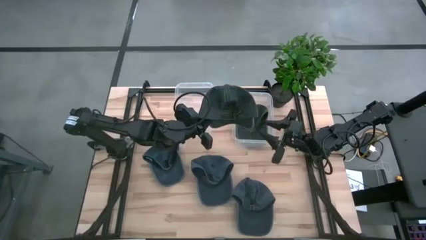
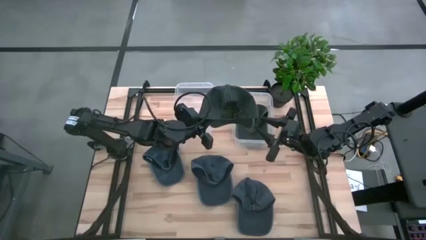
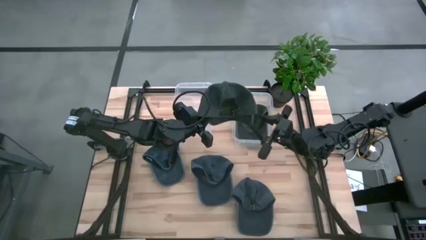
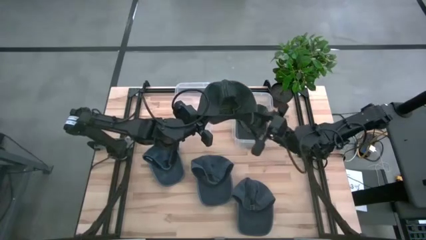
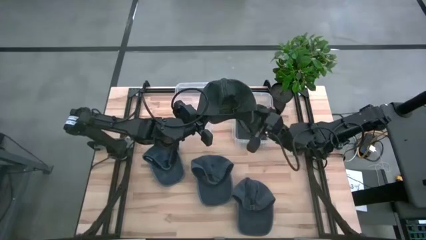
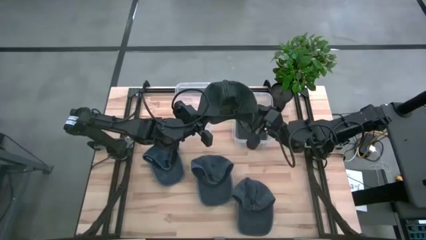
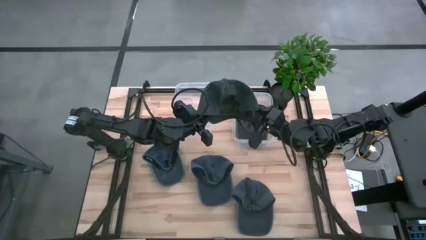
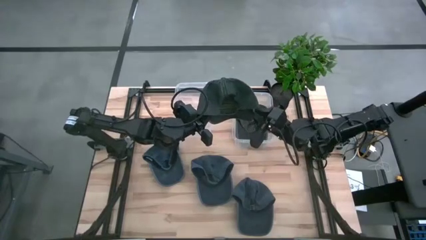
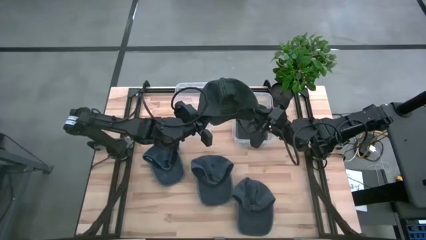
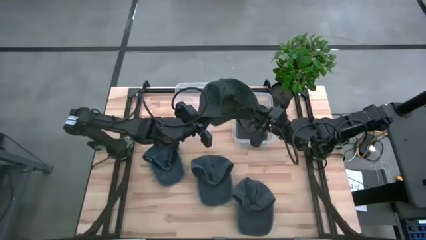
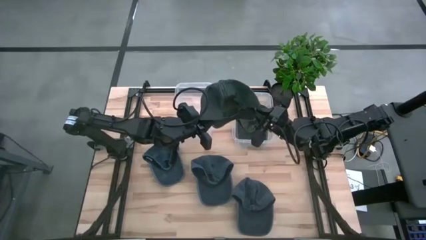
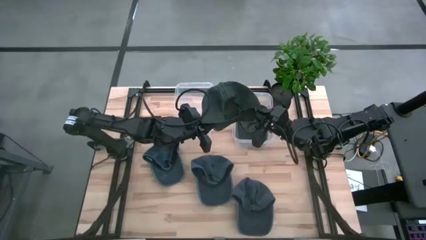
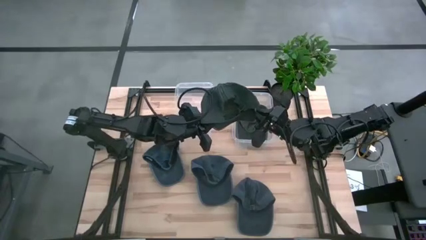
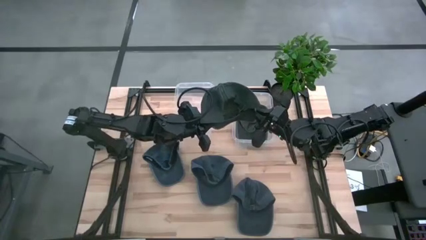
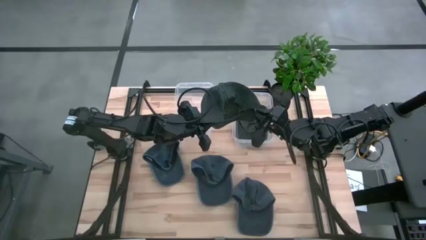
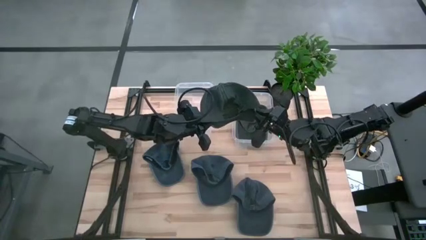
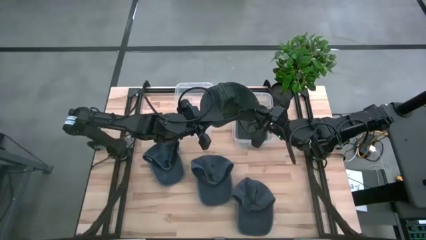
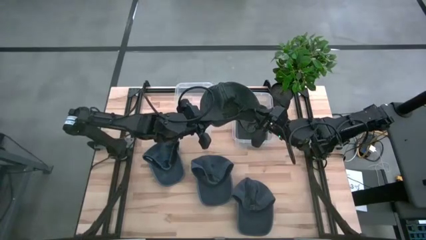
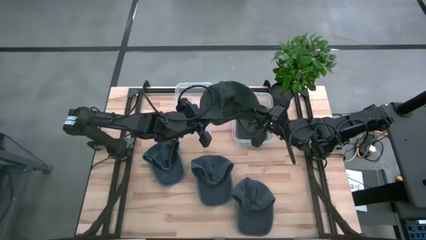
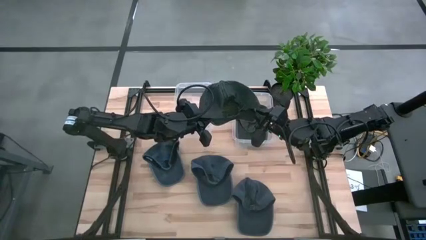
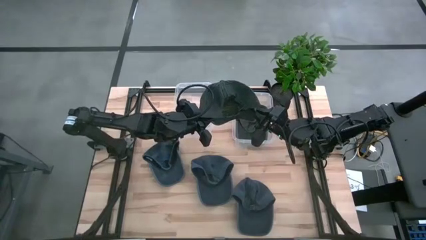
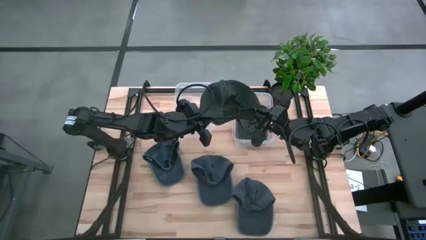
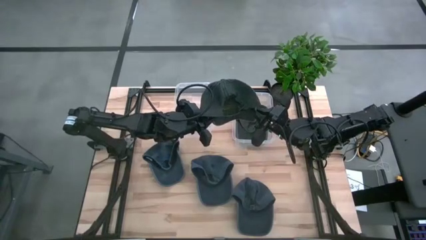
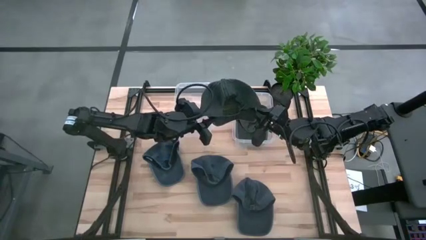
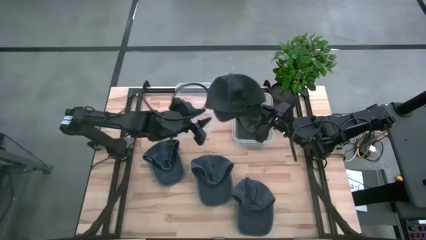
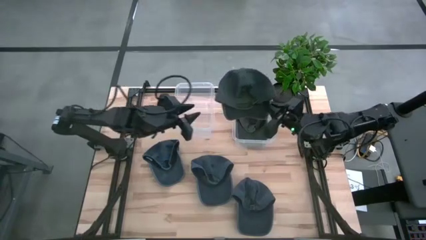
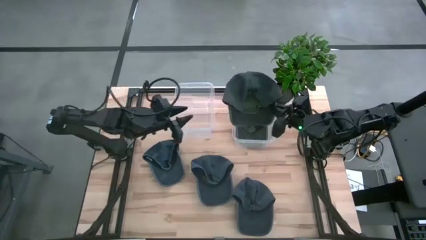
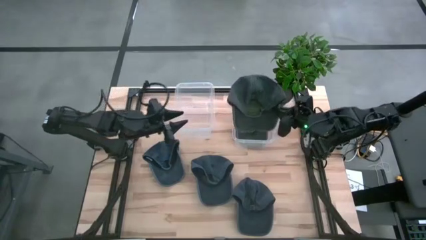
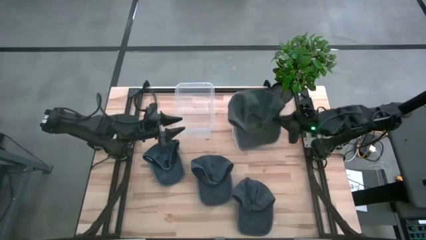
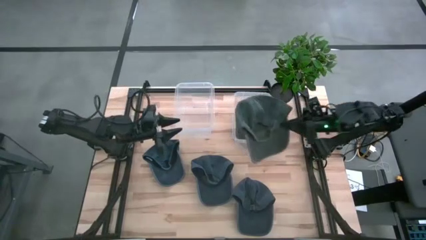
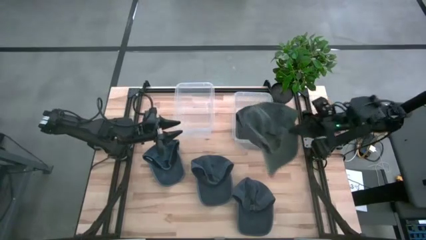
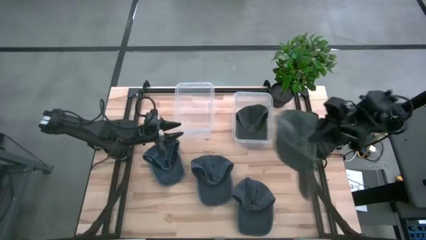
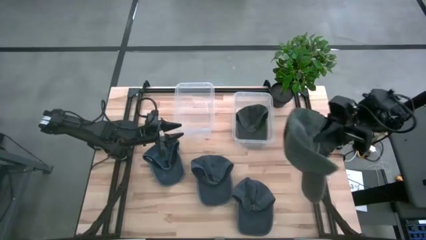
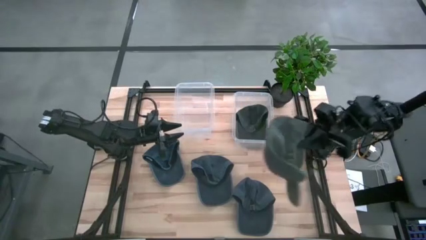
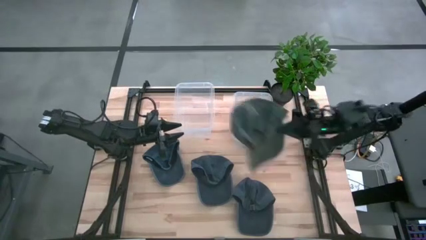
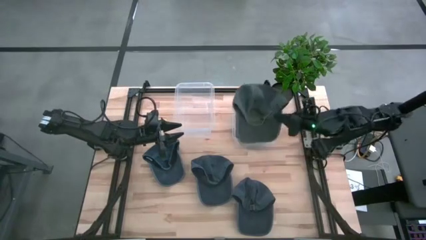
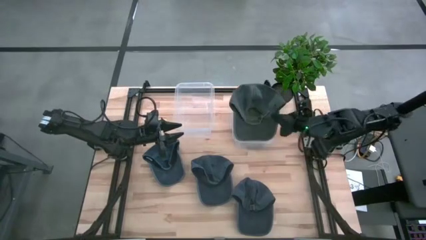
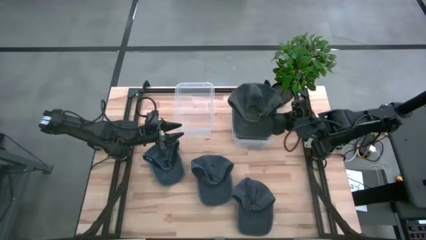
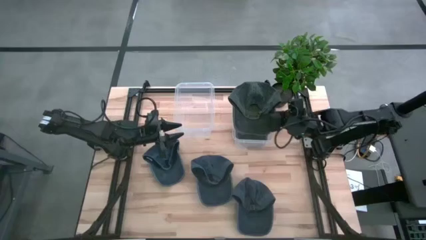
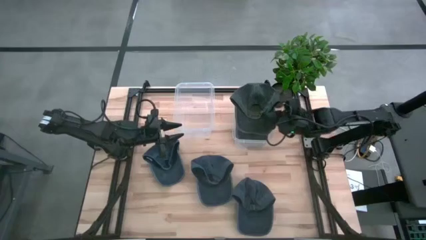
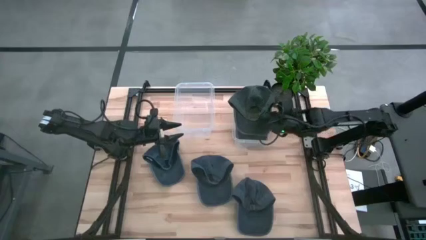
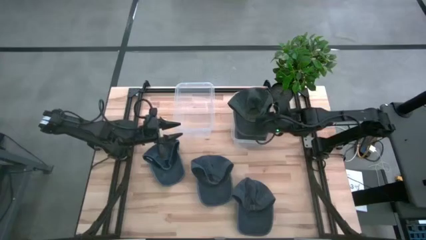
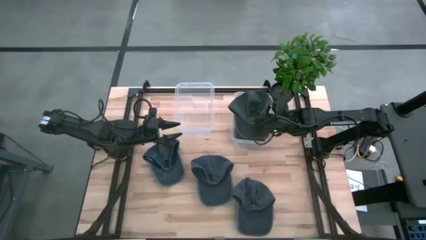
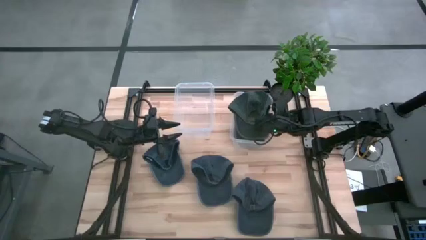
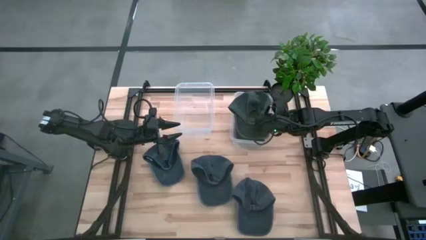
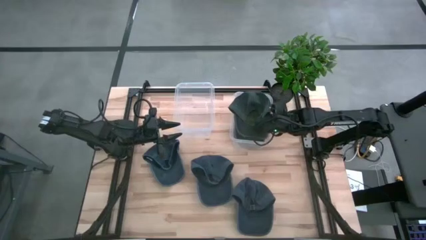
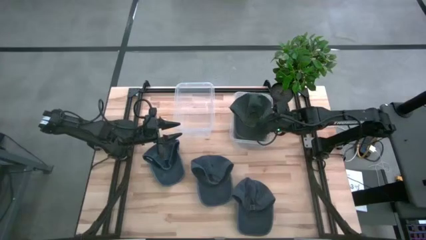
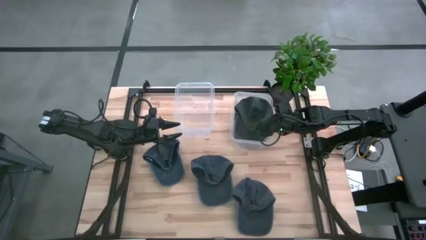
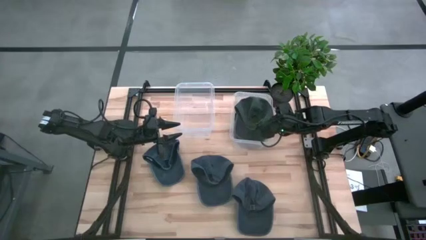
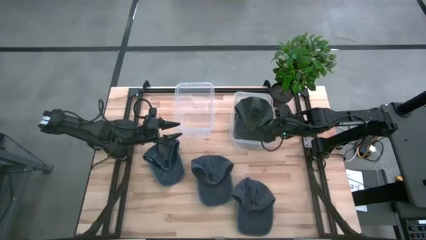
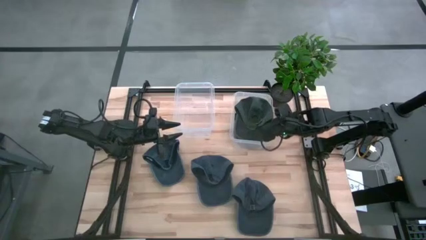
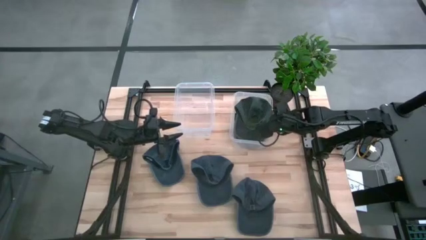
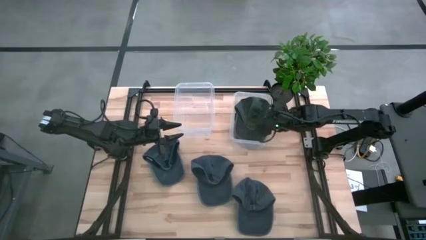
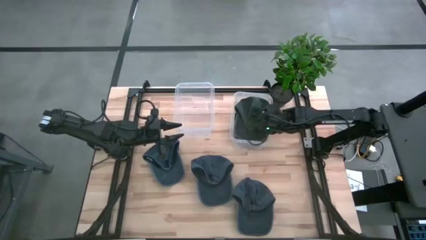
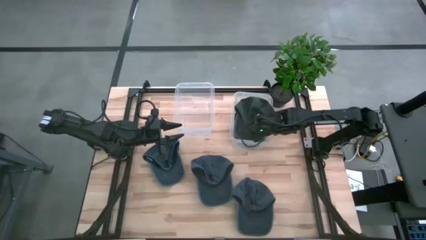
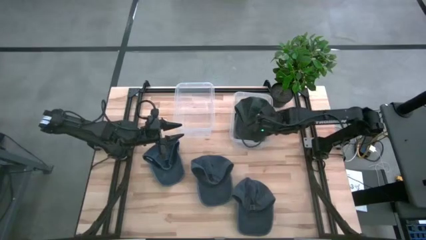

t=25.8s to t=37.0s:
Task: Pick & Place hat
Put the green cap into the right transparent bin

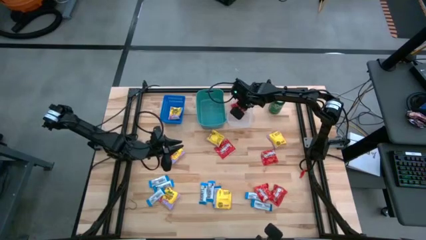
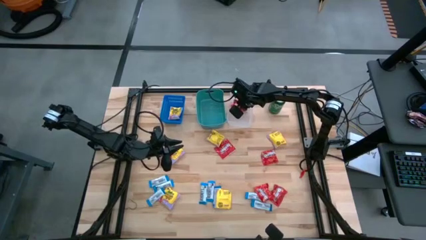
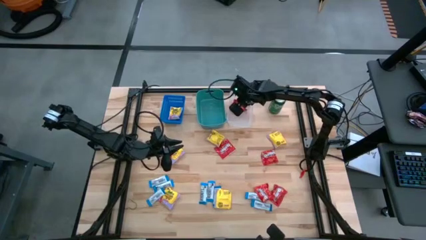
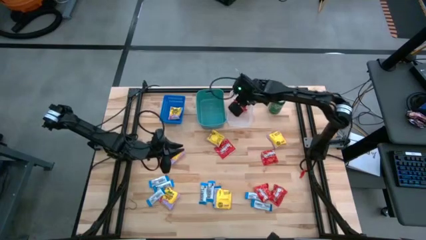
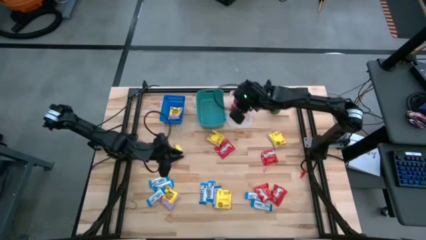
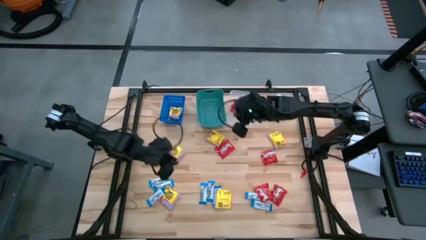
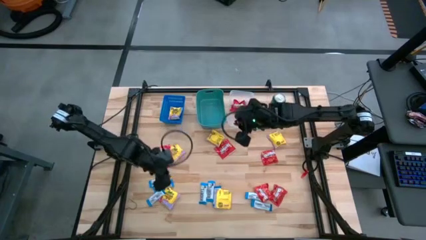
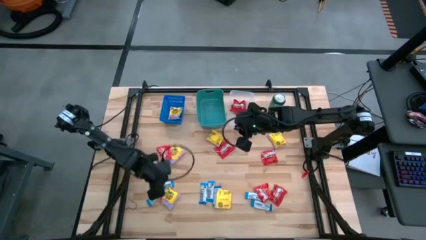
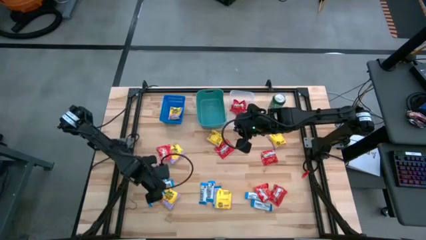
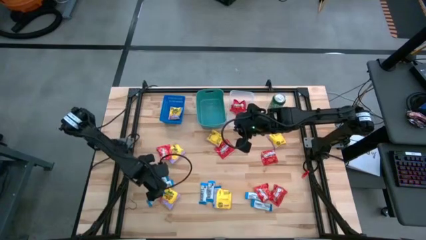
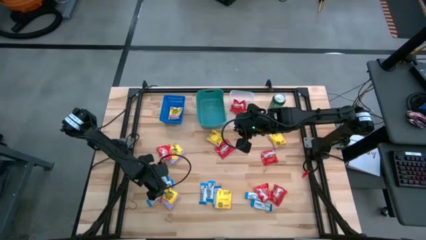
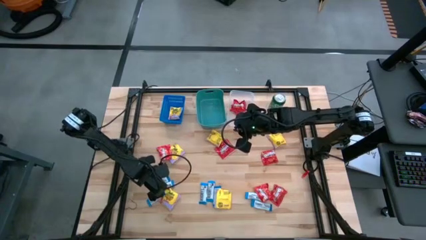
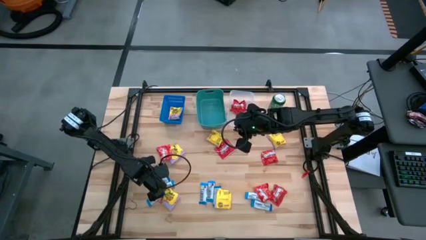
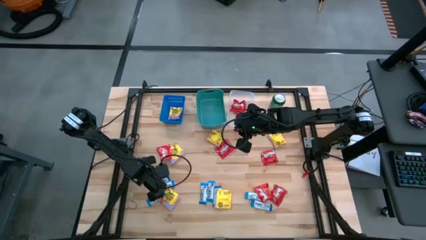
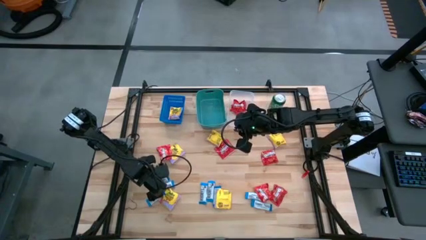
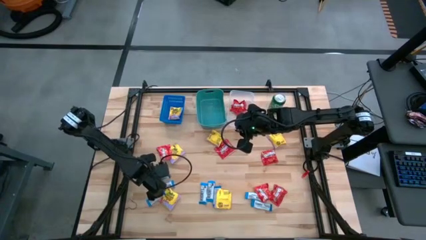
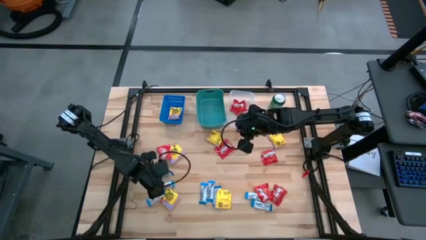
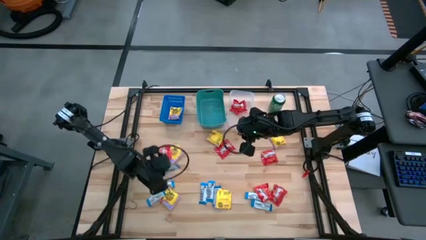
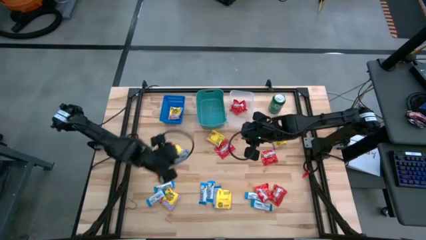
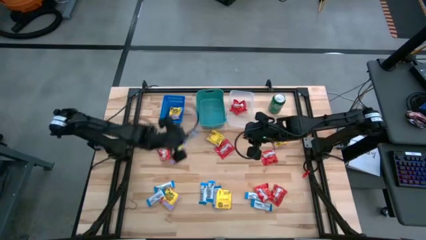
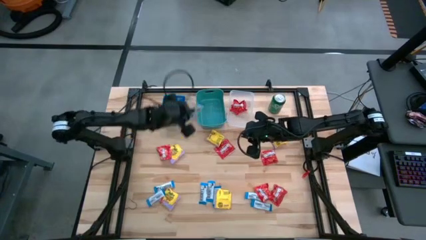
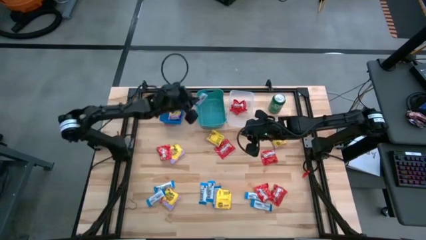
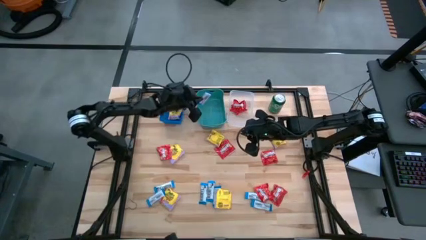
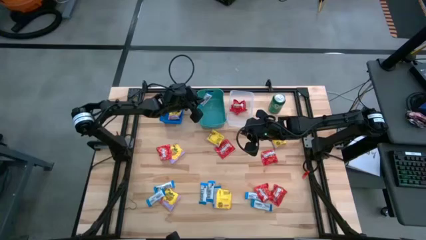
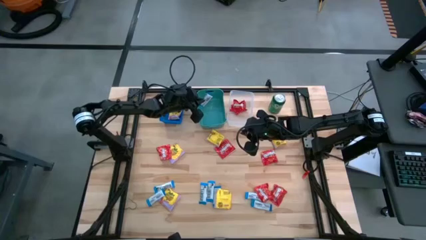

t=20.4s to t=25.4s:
Task: Sort candy
Put the white chocolate bar into the green bin
